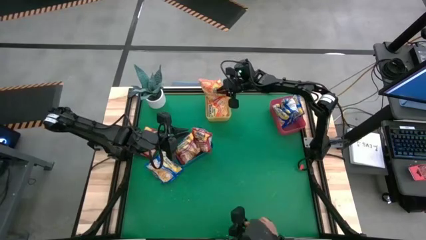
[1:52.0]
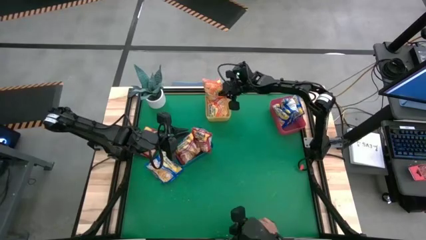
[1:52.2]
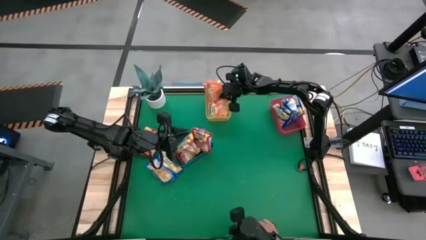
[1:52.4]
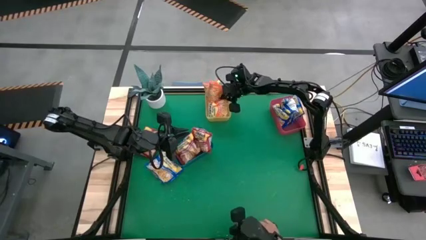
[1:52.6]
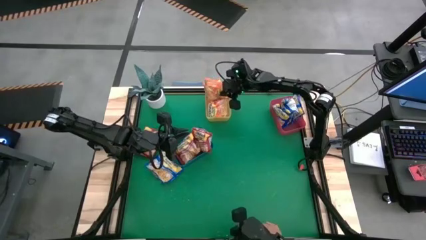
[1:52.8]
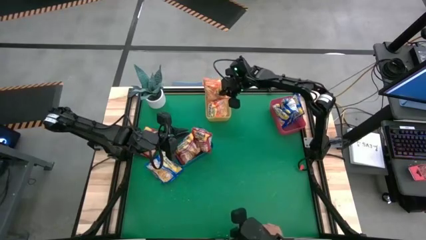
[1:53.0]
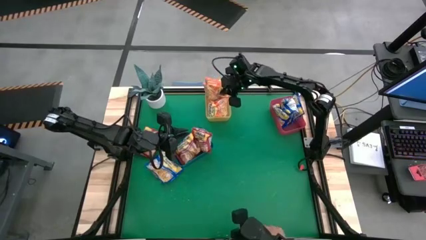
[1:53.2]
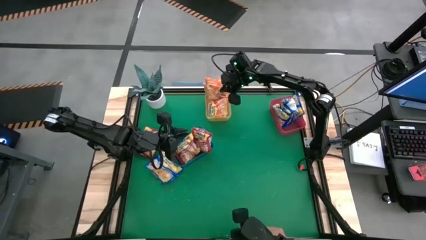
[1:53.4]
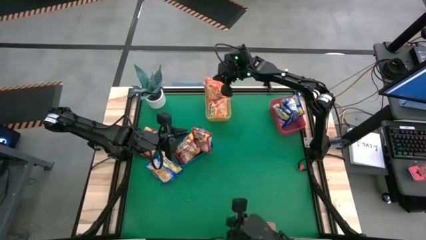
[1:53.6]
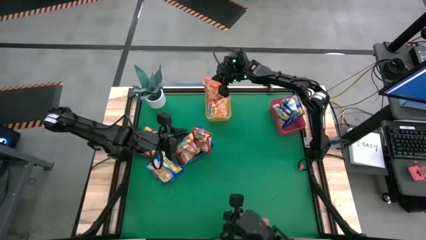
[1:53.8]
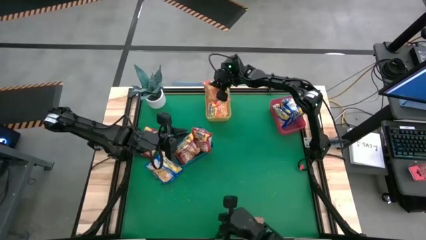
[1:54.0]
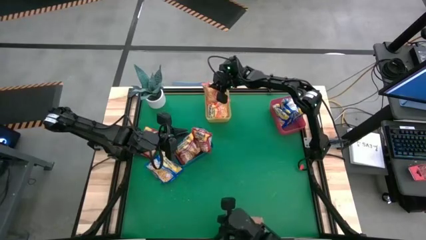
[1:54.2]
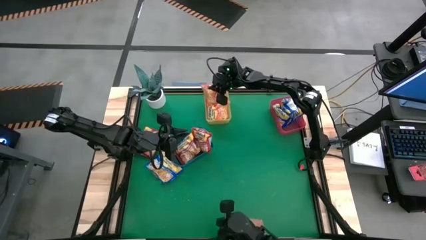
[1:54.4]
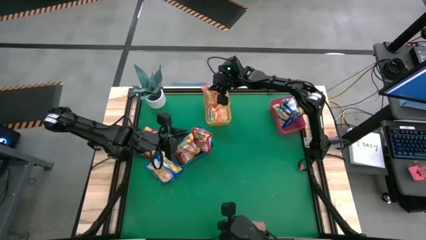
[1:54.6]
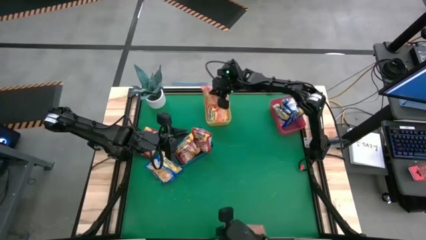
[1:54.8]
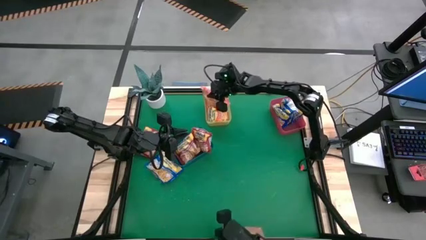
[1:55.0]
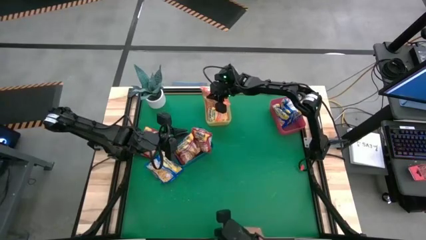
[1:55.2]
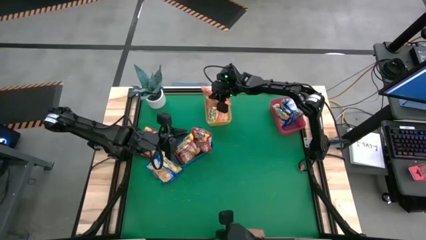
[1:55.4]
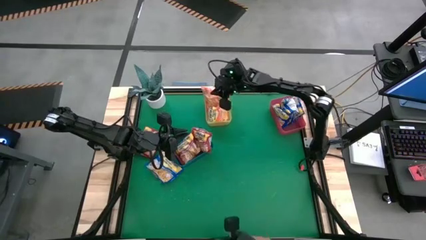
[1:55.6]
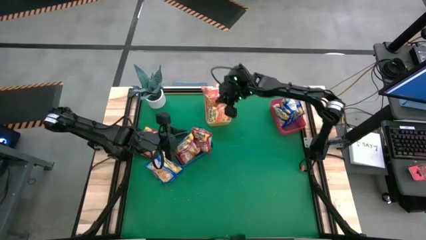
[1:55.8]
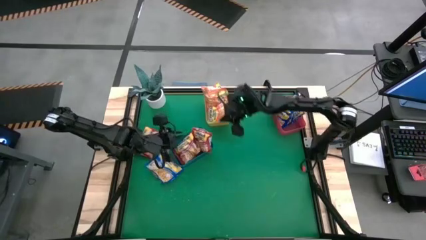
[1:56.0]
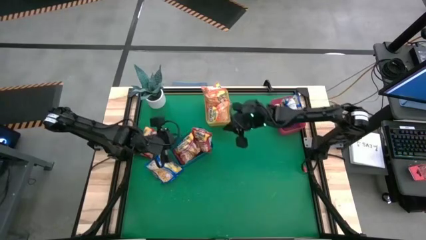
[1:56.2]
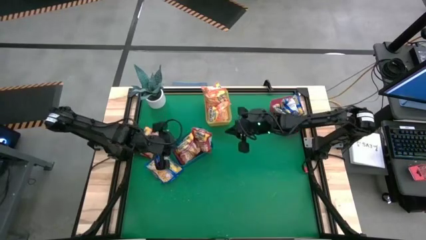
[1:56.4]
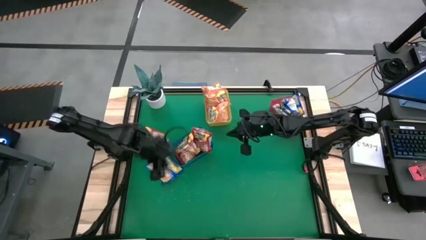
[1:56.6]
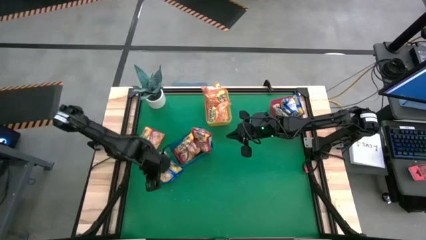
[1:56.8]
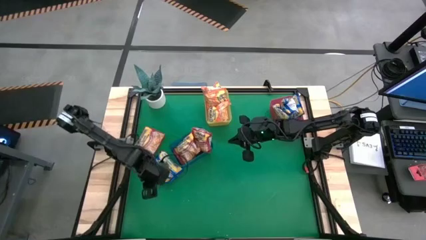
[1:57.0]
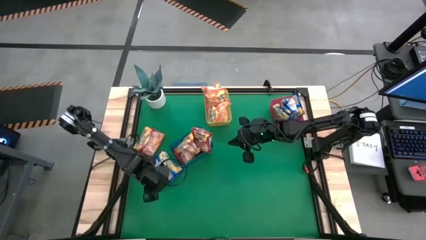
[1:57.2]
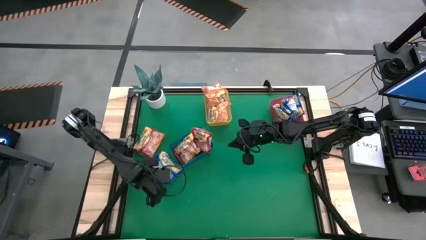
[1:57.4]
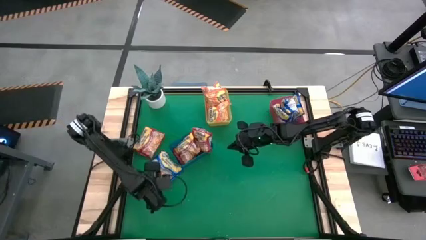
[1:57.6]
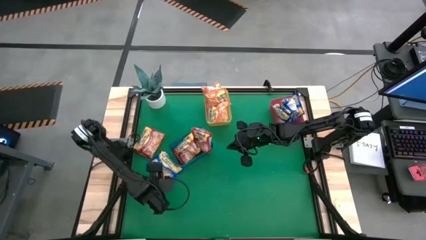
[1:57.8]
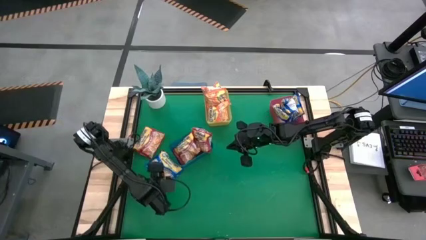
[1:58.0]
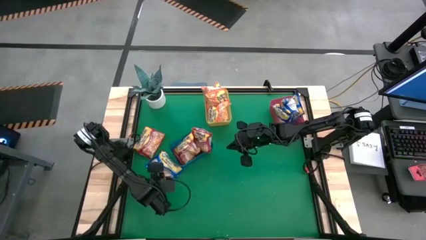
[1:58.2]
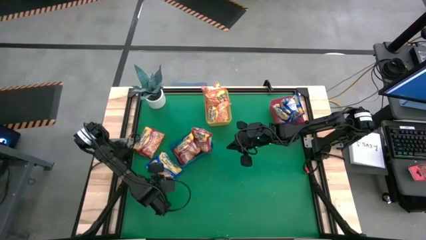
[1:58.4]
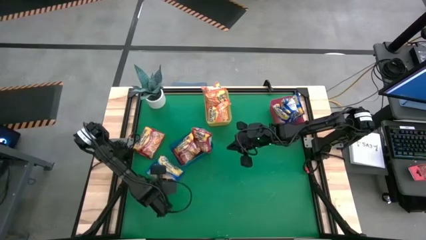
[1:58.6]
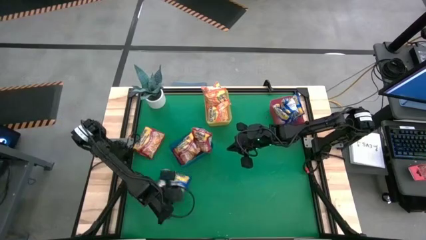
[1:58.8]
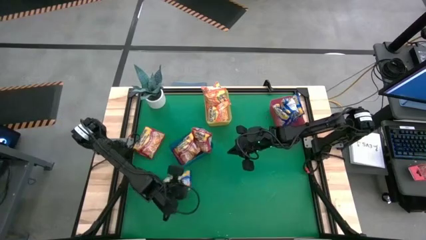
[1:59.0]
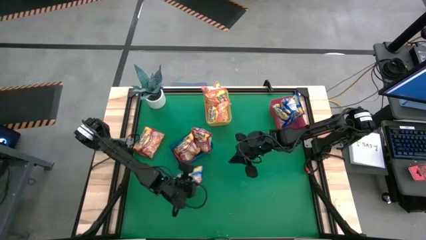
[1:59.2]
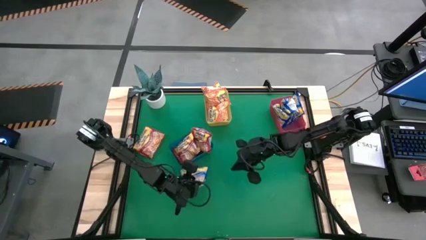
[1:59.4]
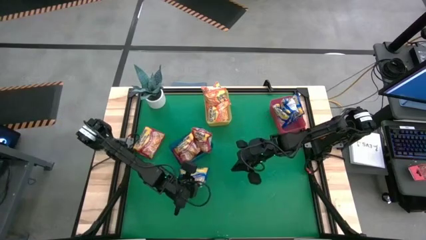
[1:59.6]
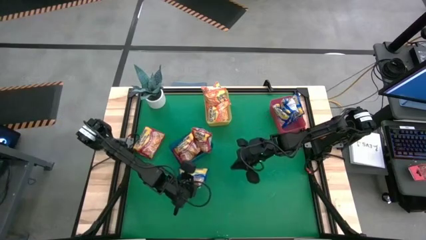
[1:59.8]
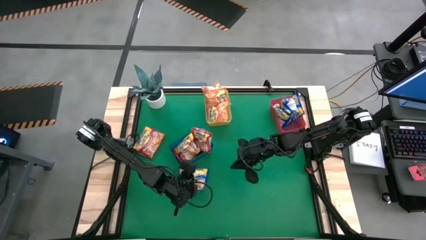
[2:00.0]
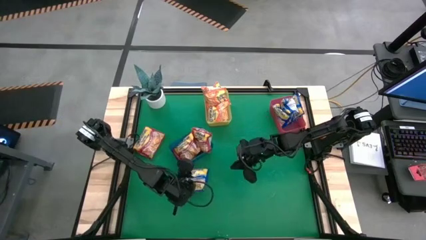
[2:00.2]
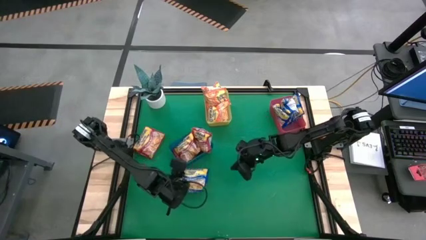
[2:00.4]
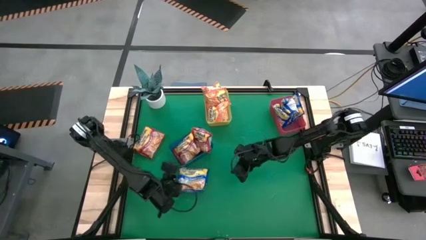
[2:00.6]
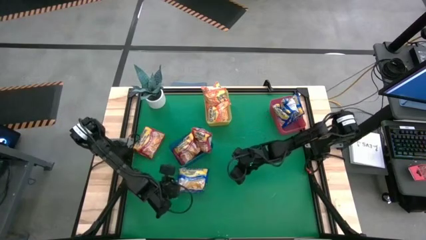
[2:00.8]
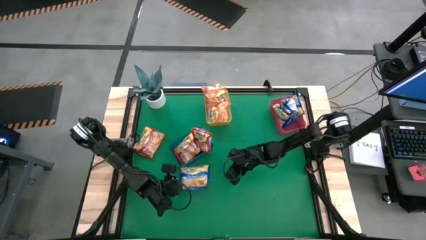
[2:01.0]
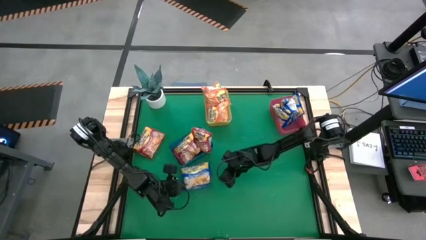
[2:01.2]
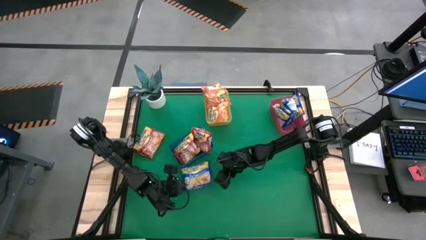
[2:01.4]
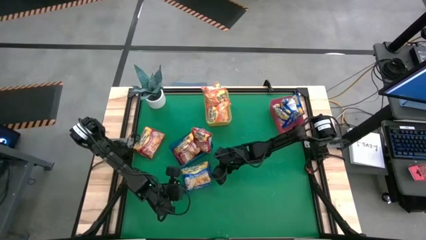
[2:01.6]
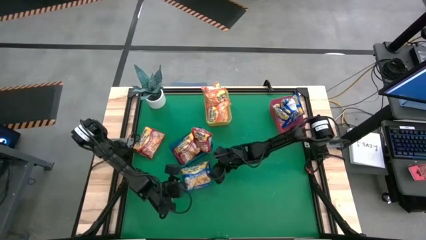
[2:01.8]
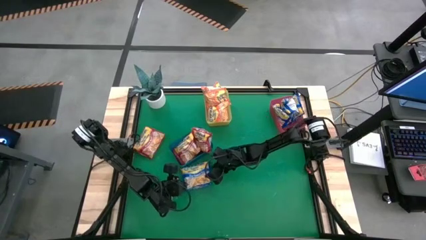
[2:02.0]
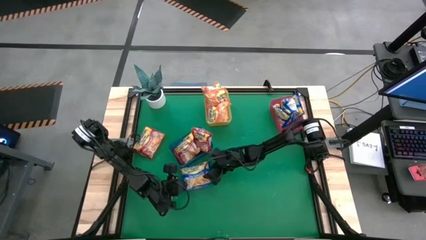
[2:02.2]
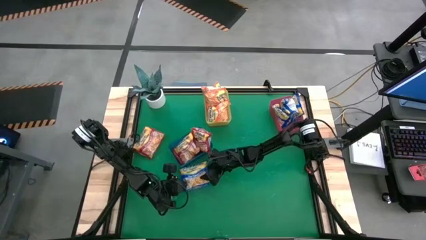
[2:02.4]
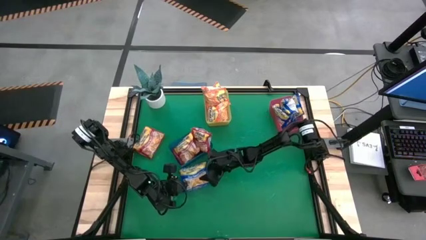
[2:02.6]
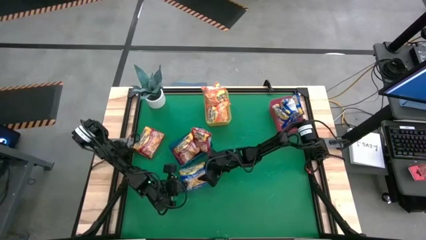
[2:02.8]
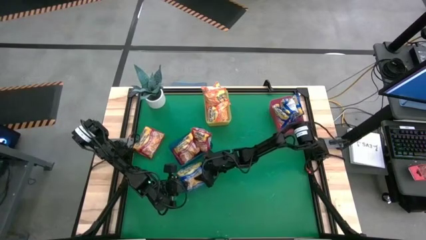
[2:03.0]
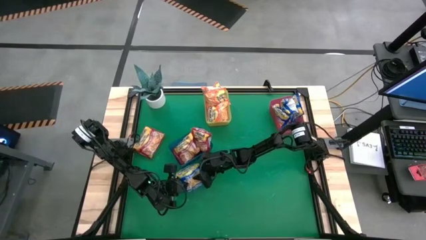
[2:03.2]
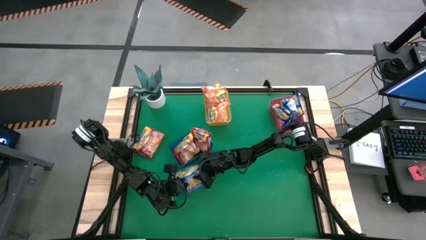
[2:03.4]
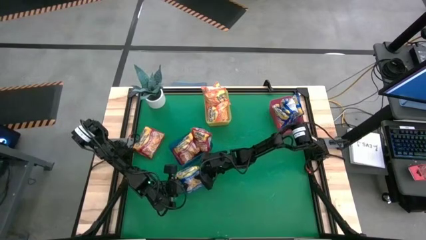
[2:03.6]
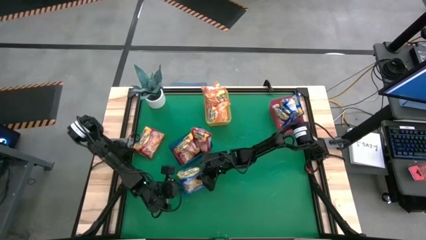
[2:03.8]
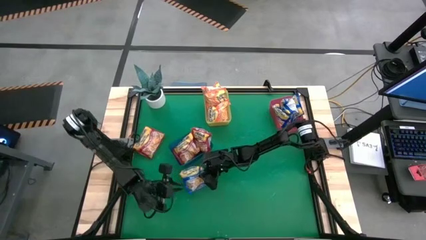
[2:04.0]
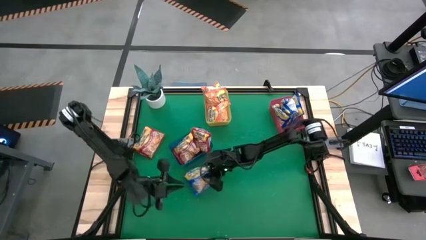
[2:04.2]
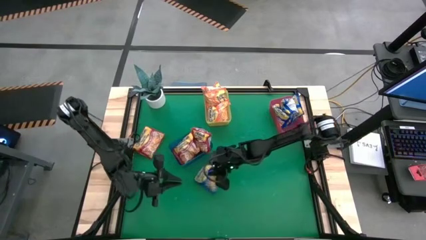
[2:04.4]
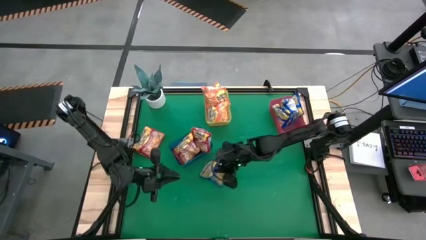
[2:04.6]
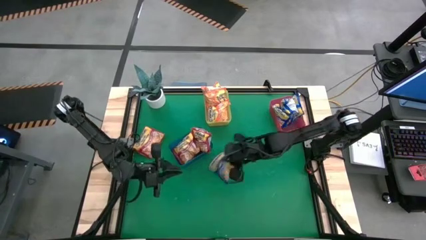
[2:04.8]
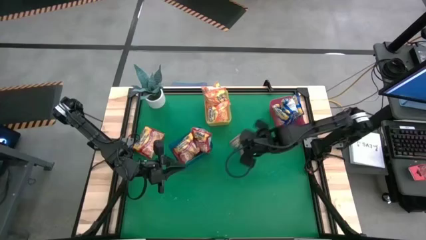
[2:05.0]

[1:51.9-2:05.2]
Task: Sort Maruchan noodles
Put the blue noodle pack into the red bin

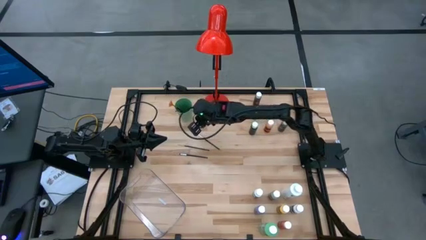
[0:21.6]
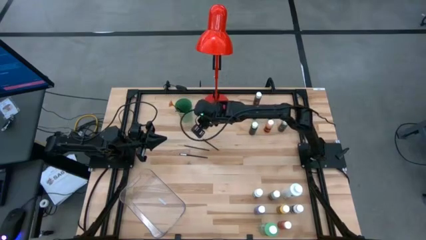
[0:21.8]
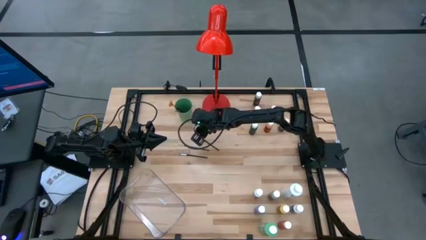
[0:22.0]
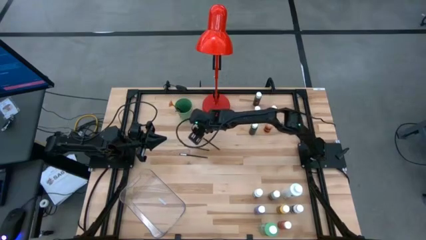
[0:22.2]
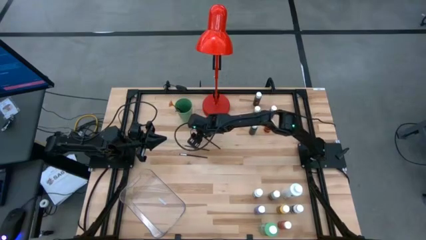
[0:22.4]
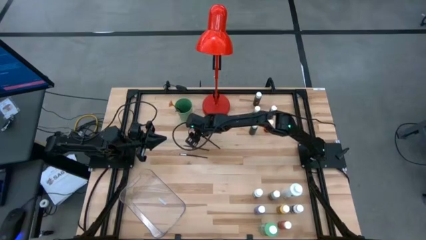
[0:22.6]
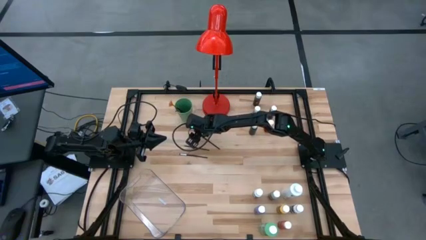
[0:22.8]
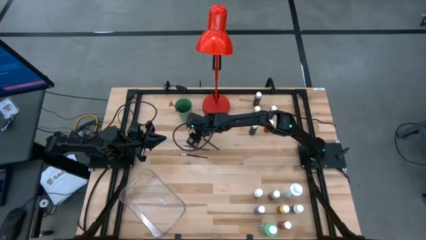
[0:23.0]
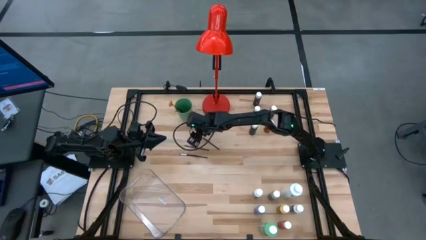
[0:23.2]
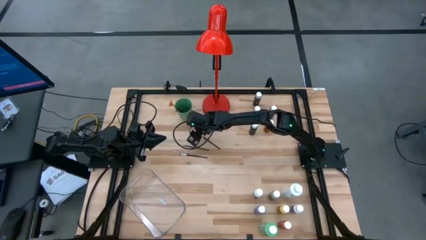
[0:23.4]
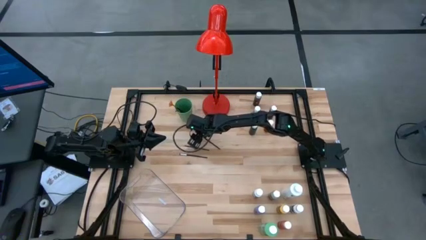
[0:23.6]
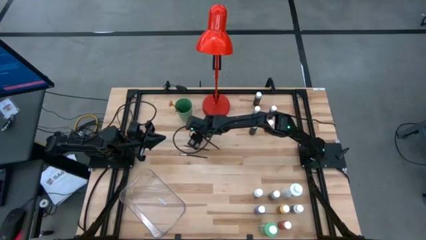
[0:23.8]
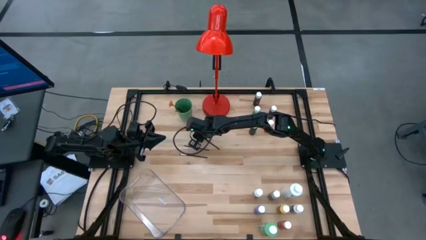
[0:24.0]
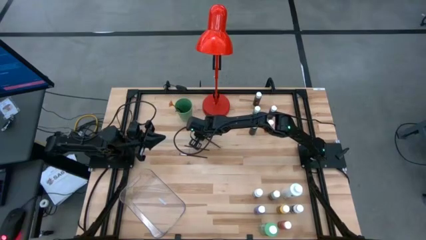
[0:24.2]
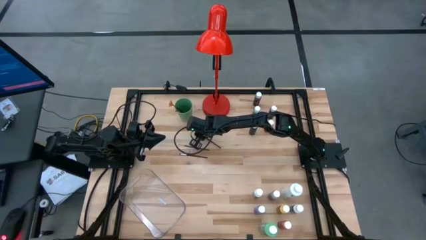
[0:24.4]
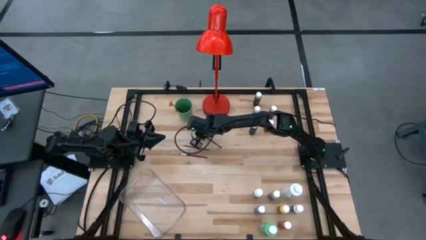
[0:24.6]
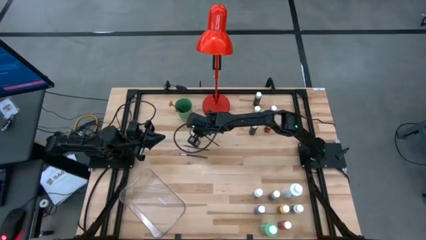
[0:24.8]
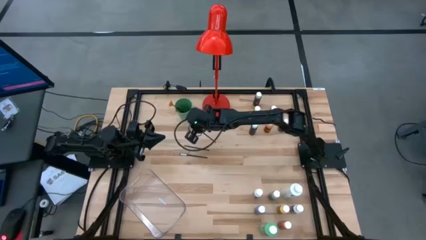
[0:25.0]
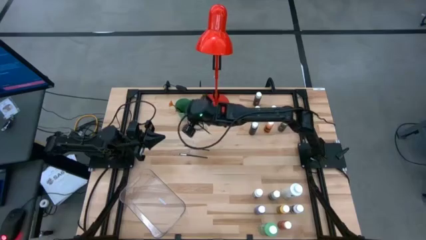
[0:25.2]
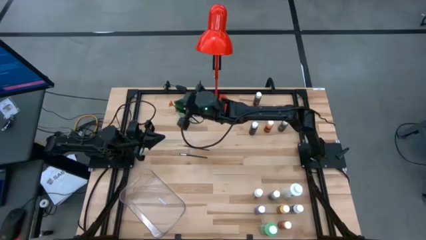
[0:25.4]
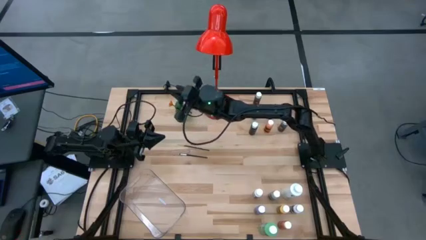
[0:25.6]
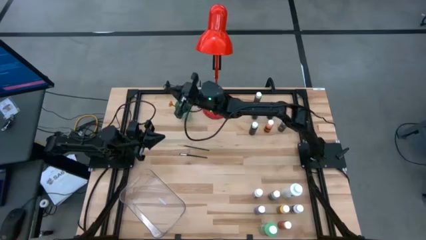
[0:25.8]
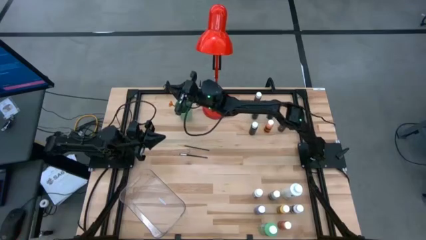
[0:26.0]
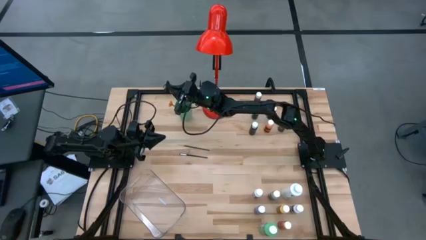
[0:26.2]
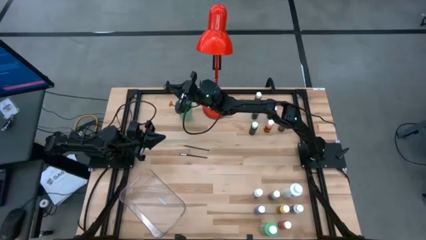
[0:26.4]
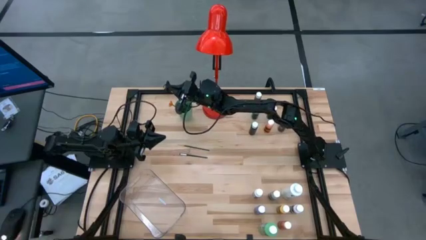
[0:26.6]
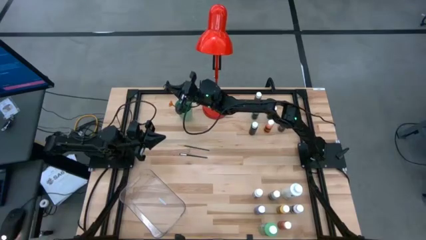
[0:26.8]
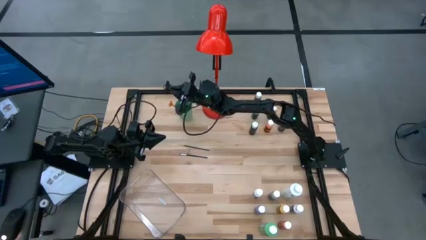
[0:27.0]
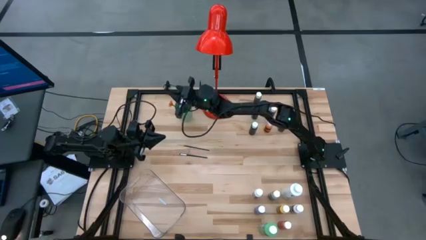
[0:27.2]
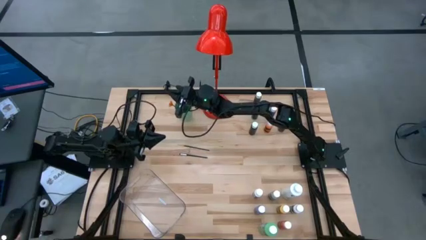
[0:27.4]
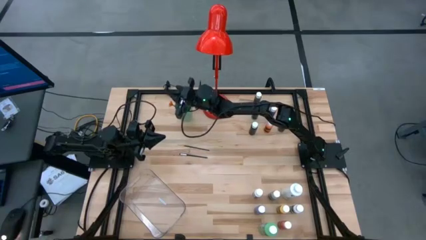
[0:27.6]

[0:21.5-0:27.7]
Task: Pick & Place Paint Supplies
Put the silver paint brush into the green cup
